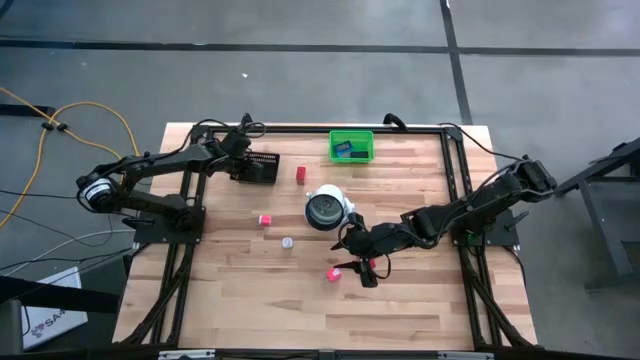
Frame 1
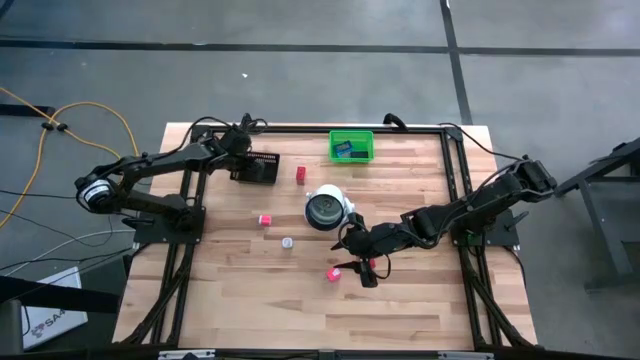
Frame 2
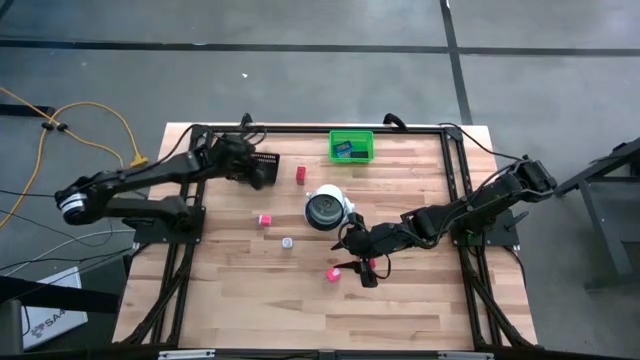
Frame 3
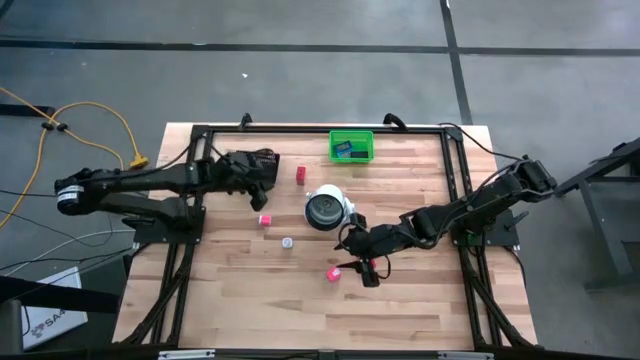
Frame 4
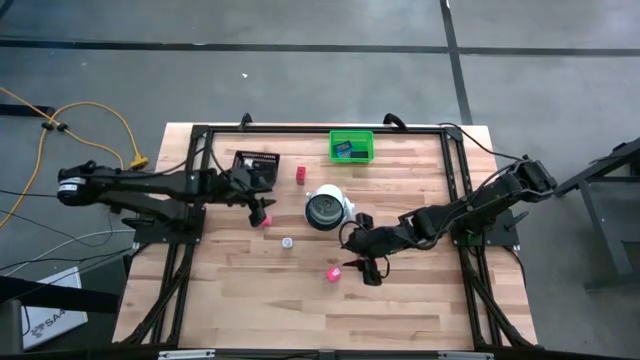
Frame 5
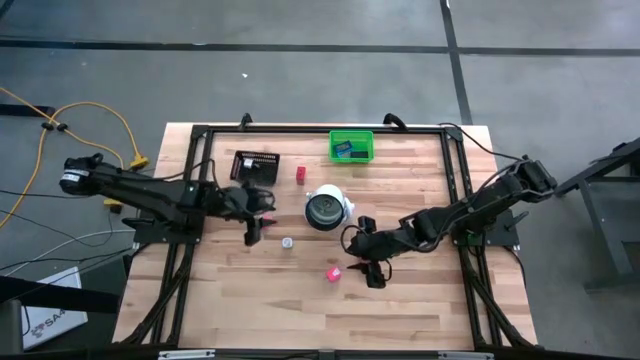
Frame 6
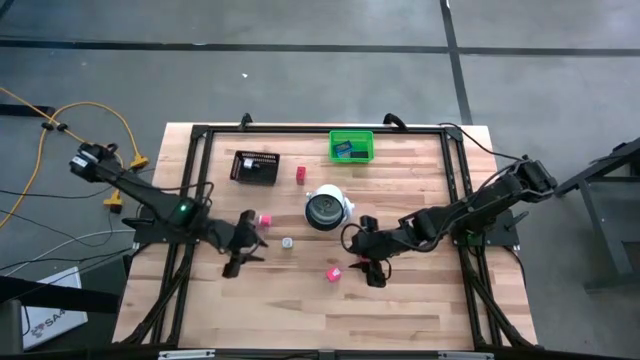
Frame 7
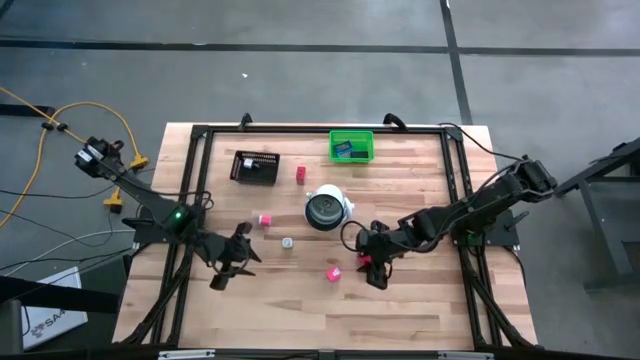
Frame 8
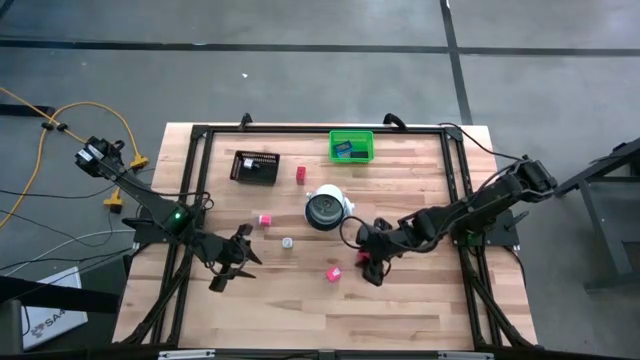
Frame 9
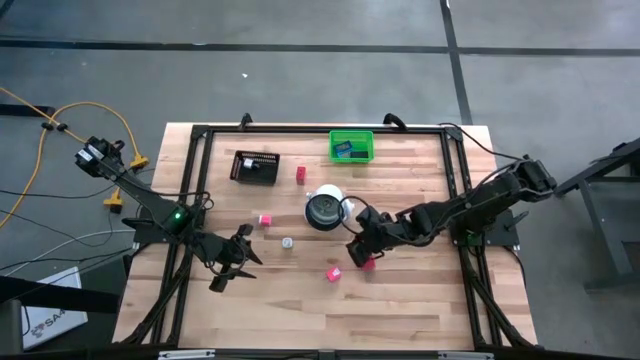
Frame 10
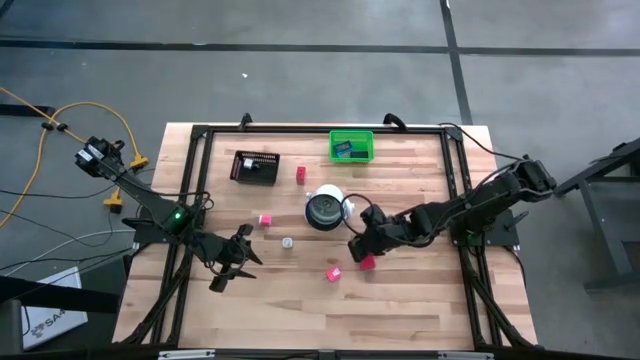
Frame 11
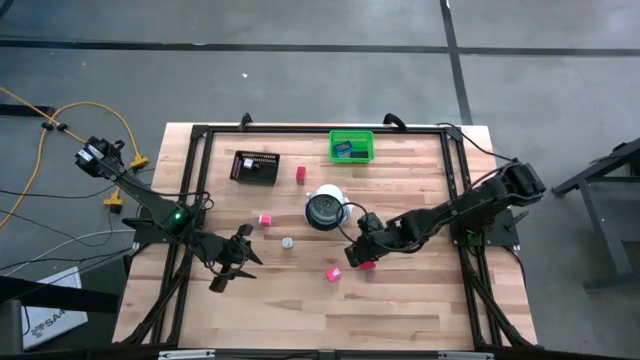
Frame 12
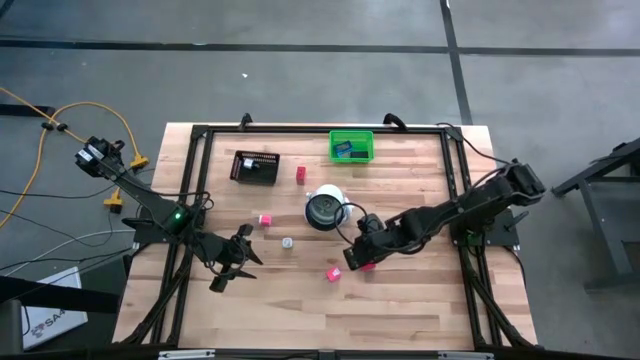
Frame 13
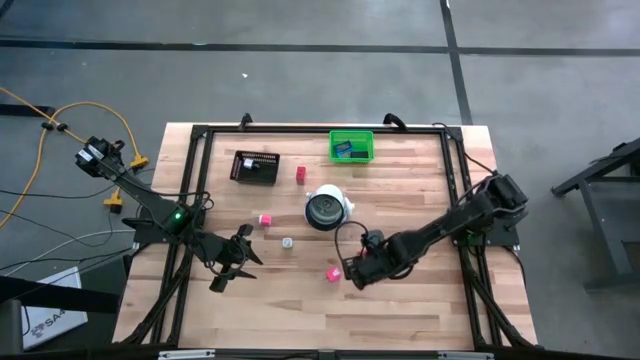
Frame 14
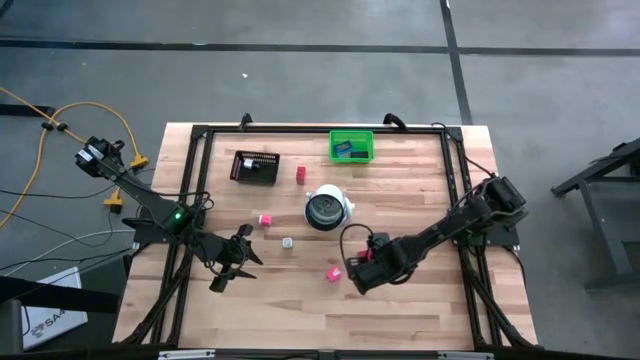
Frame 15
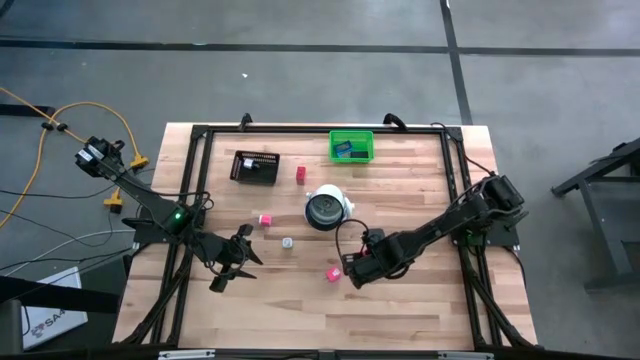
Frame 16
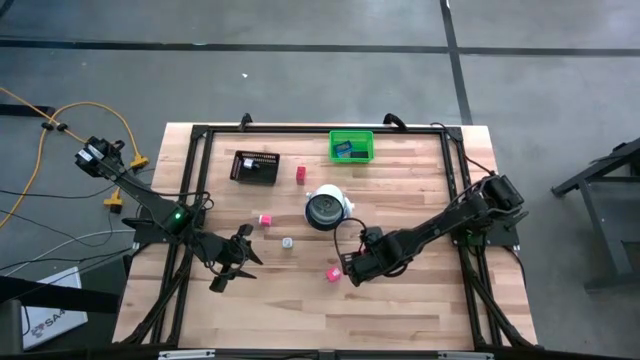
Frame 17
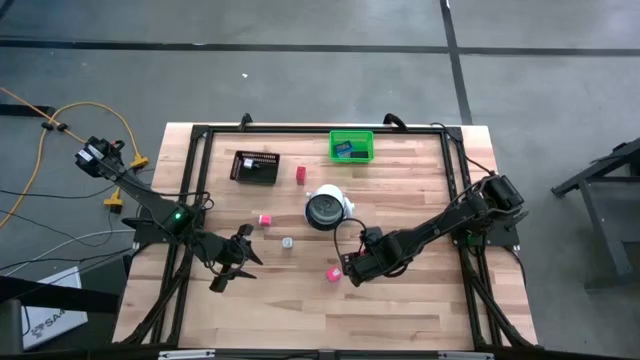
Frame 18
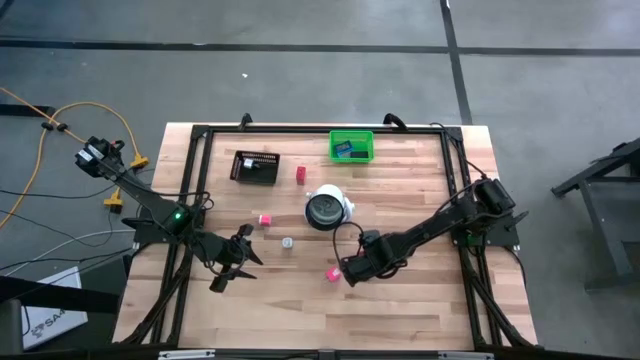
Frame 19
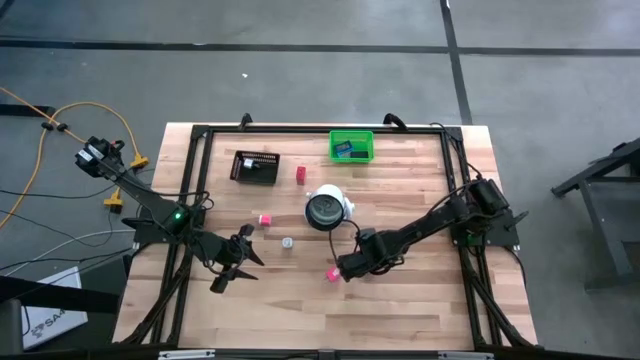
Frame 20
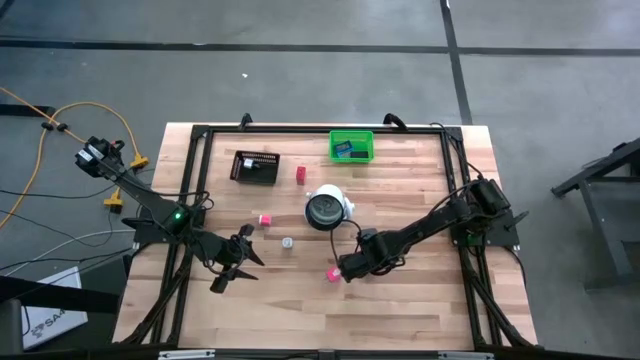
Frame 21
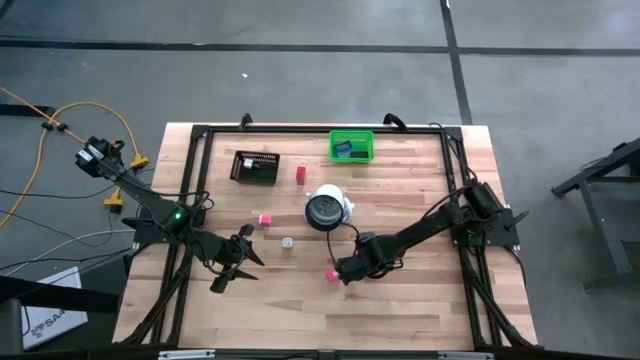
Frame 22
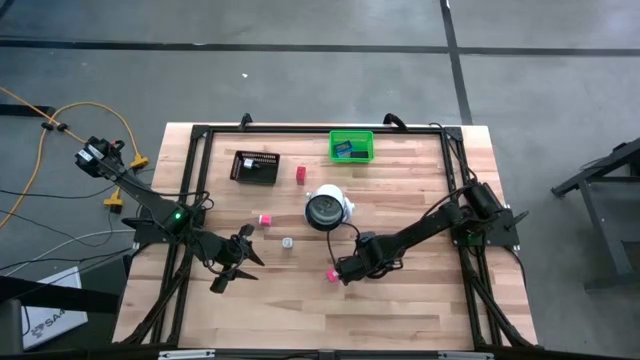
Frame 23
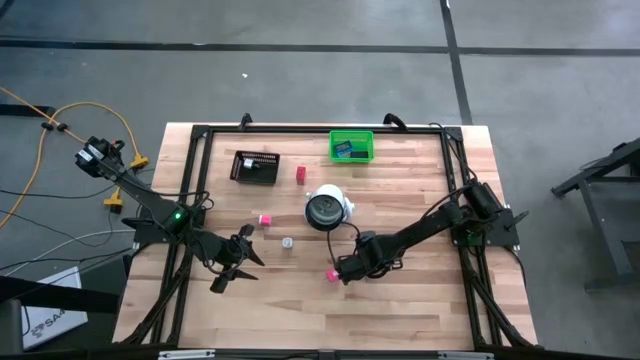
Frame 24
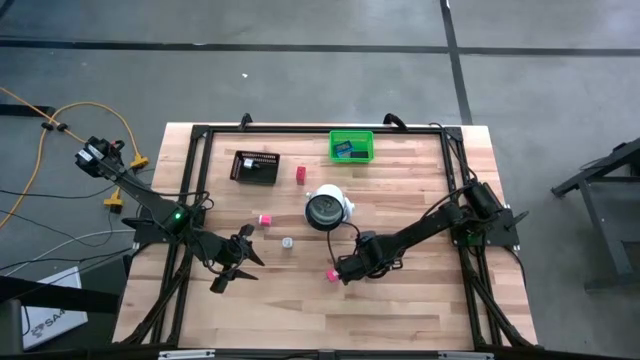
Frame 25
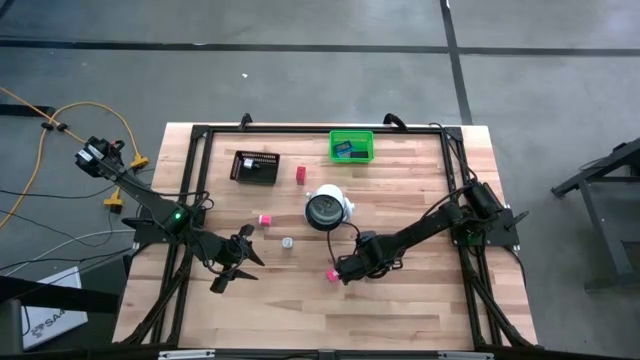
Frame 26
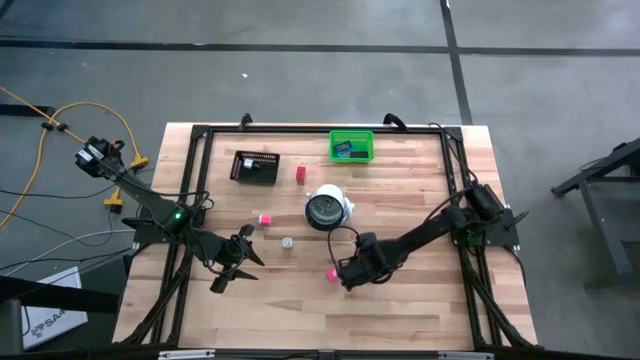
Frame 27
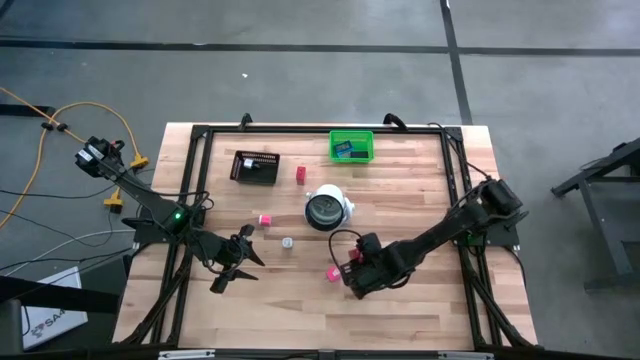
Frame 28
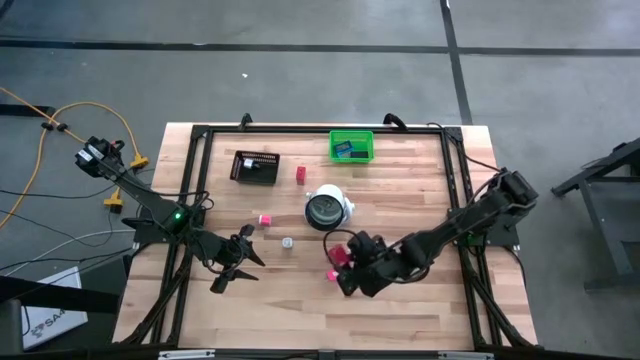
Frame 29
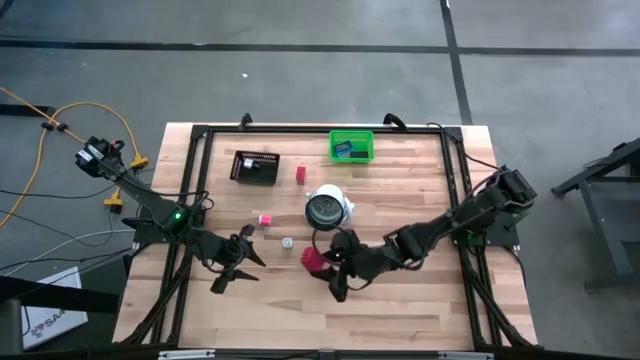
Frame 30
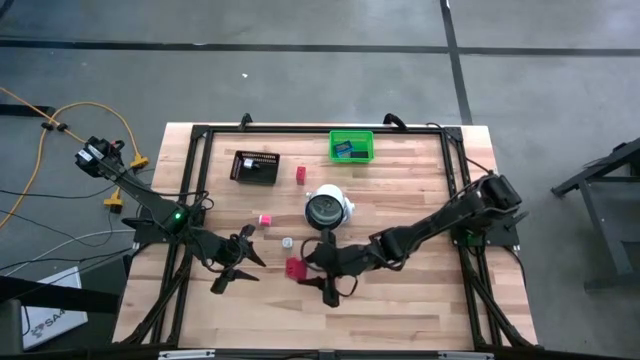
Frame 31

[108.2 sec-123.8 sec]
Task: Pick & Place Office items
Put the bottom red charger adapter into the black bin

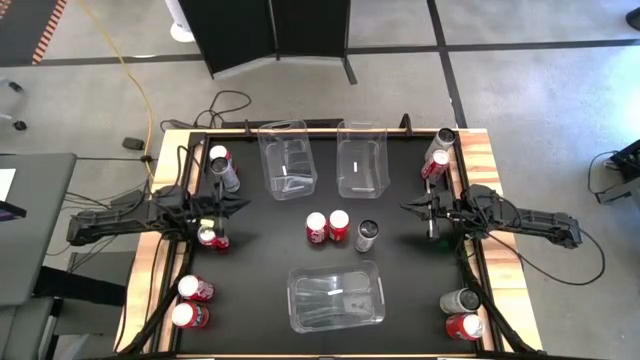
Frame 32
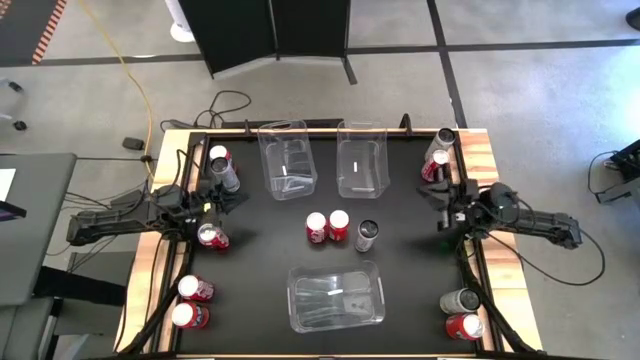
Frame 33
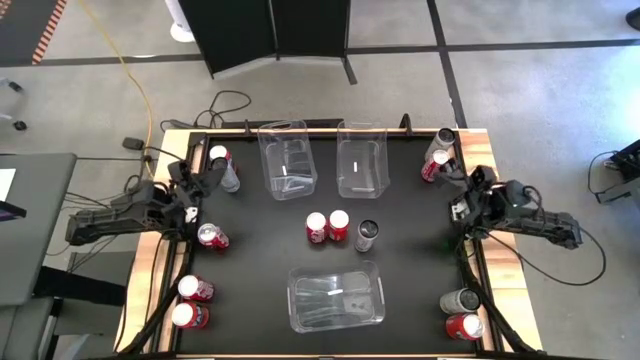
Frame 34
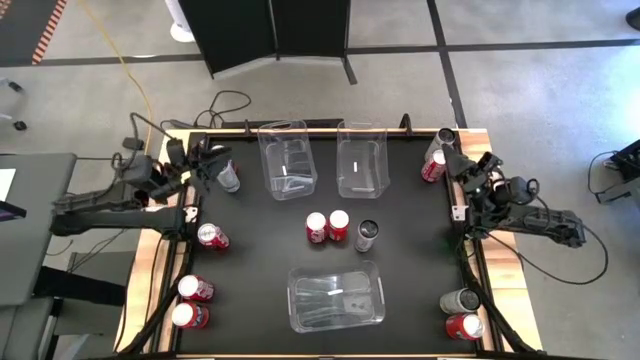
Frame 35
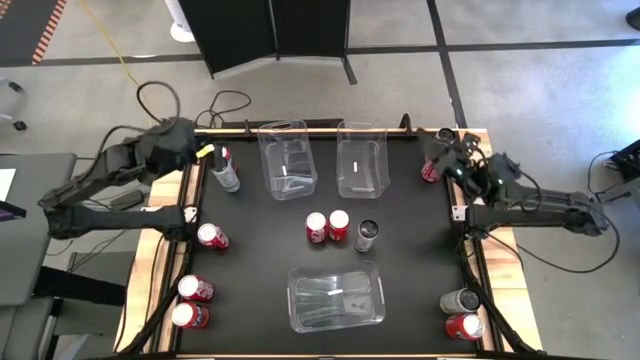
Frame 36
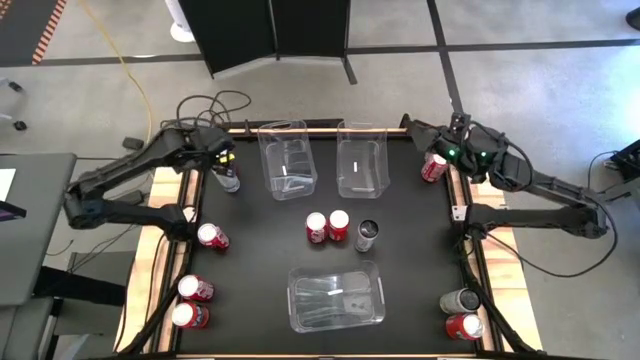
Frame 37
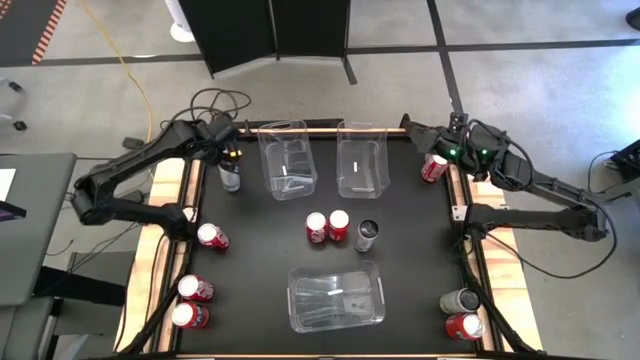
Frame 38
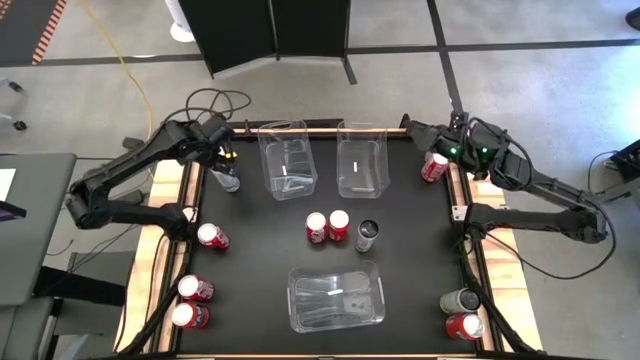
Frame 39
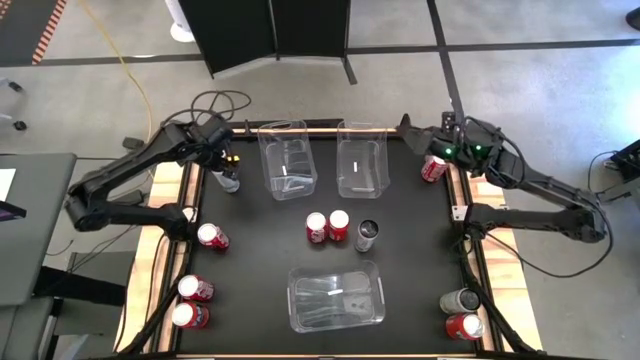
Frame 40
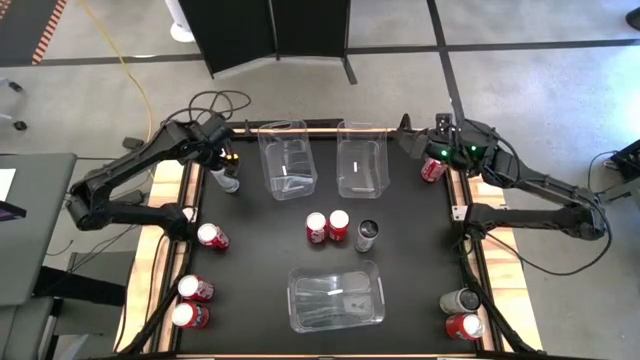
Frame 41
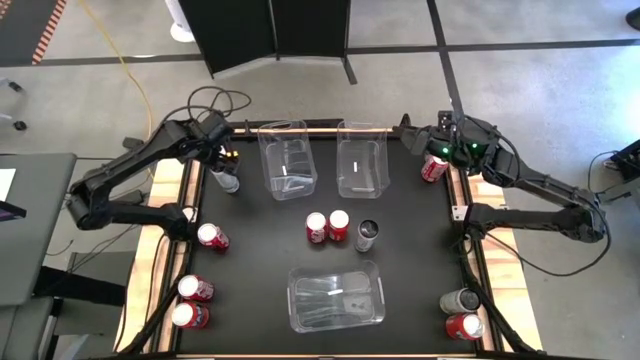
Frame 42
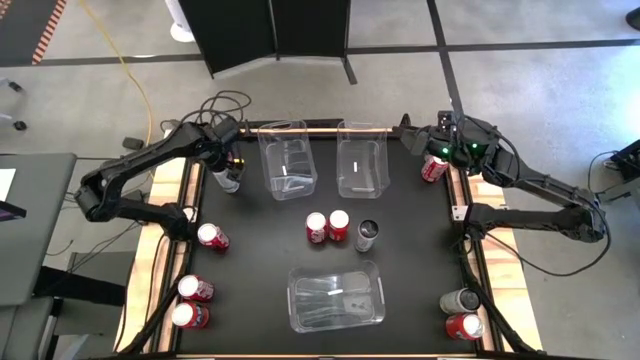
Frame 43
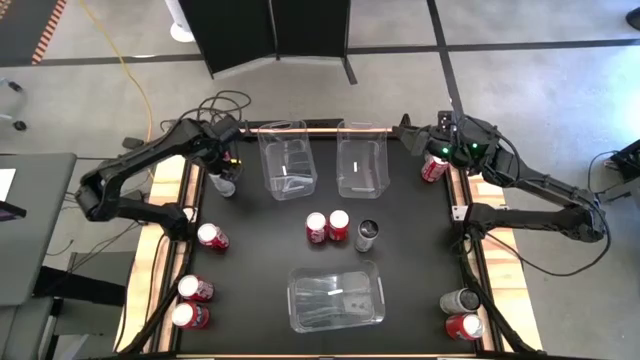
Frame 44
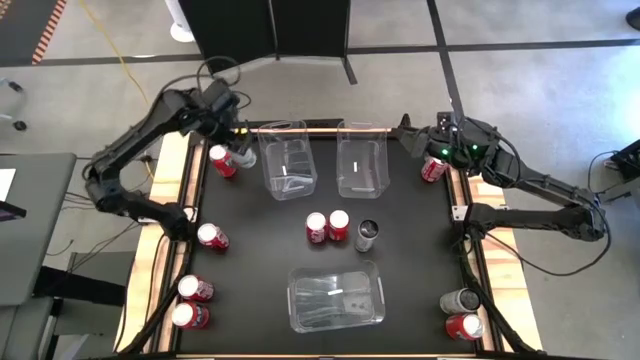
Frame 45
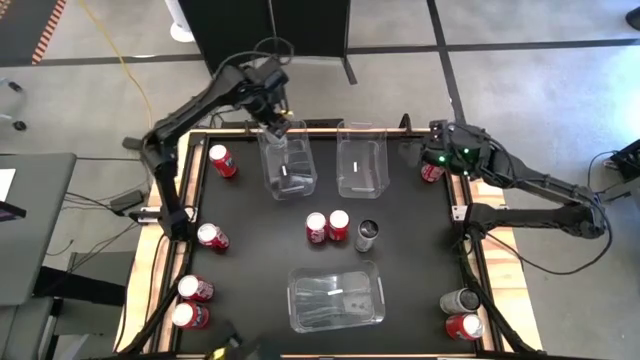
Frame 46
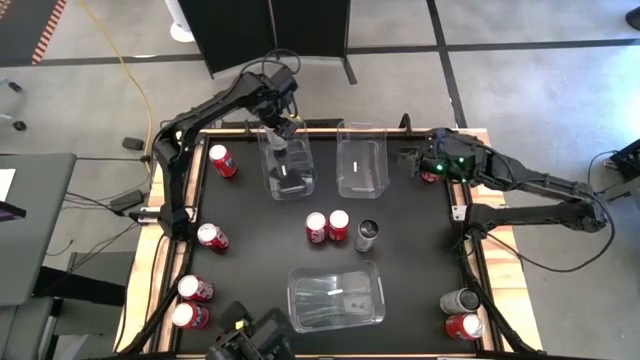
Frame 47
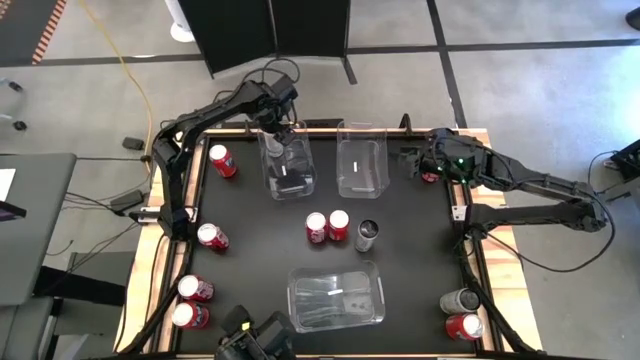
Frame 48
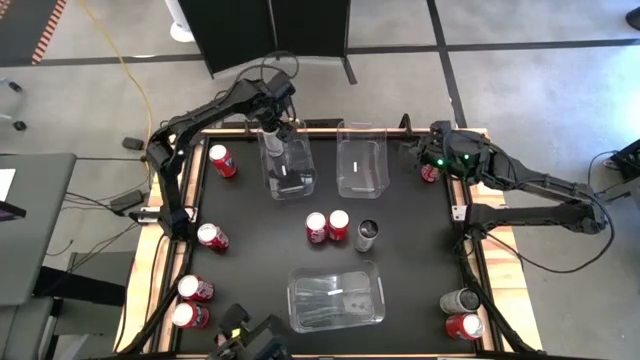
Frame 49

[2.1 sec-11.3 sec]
Task: Sort soda cans
Put the top left white soda can in the top left transparent bin
